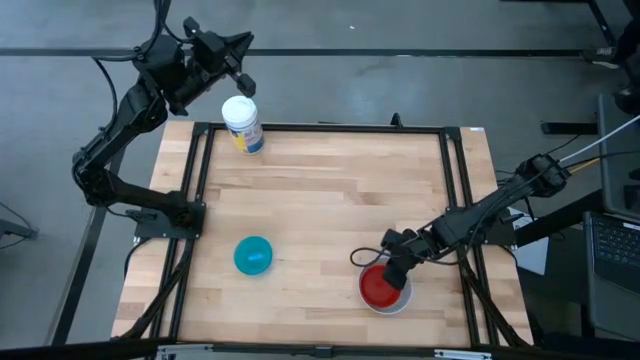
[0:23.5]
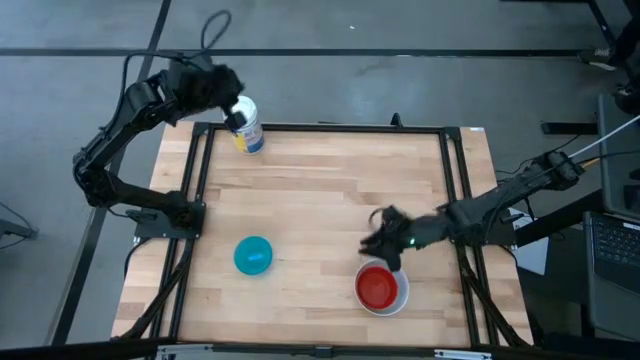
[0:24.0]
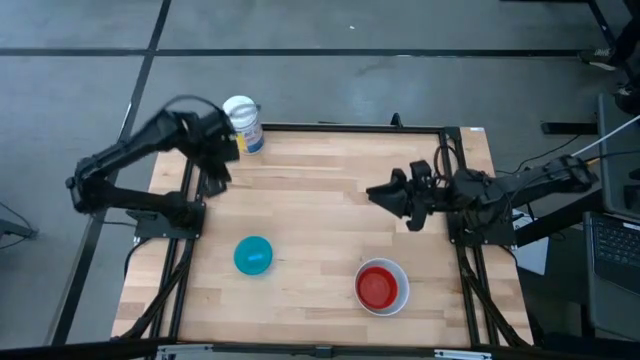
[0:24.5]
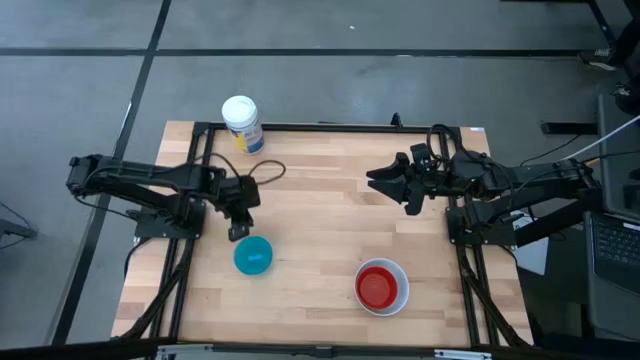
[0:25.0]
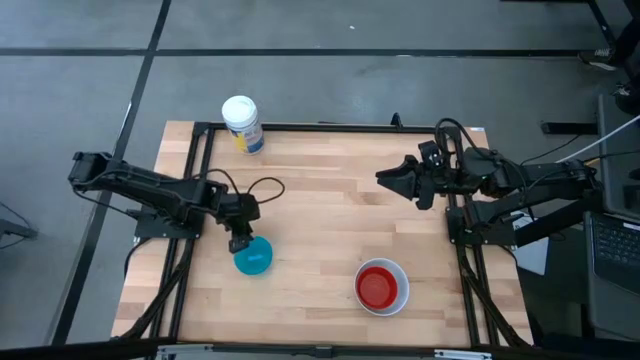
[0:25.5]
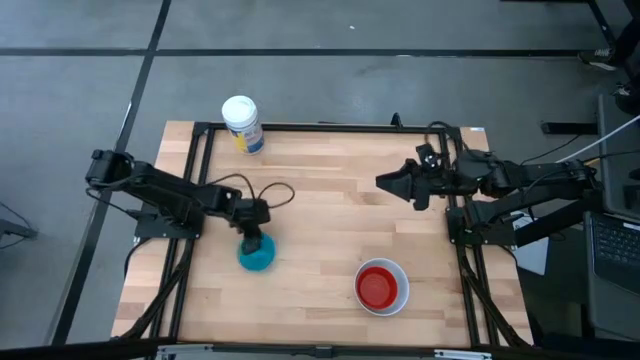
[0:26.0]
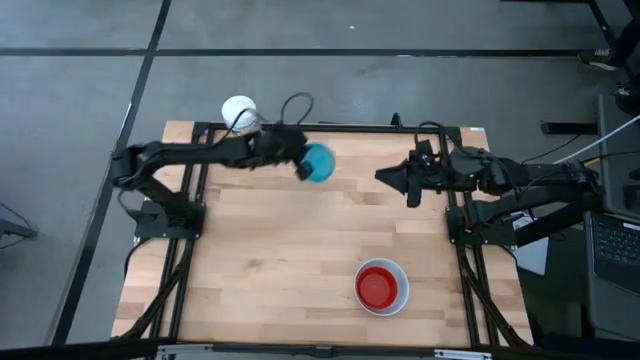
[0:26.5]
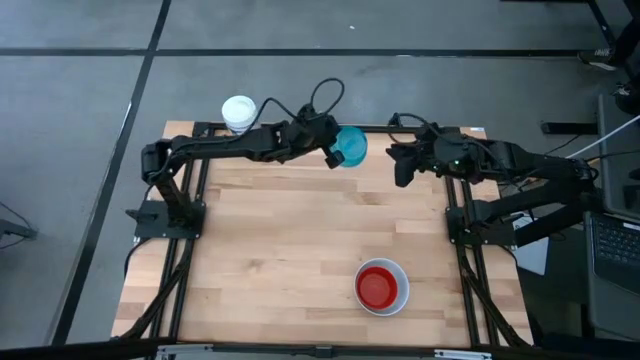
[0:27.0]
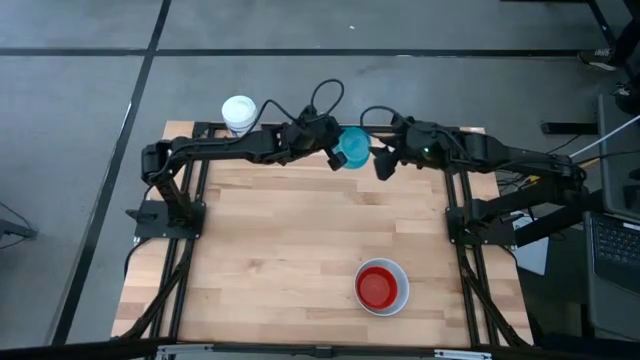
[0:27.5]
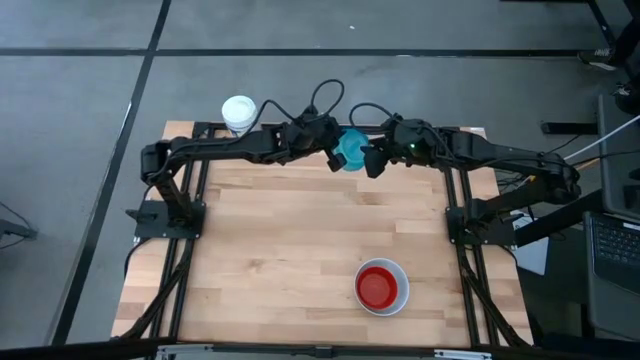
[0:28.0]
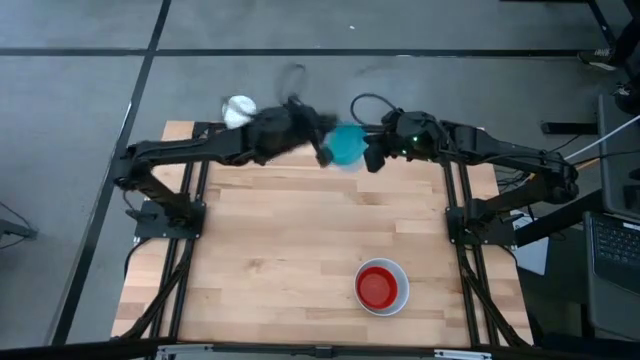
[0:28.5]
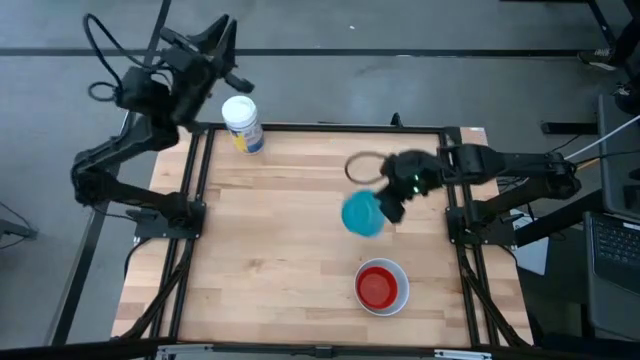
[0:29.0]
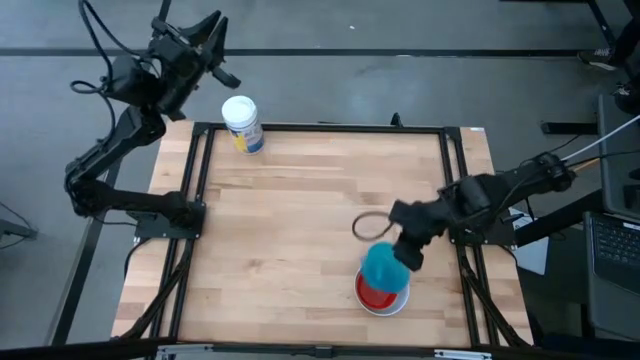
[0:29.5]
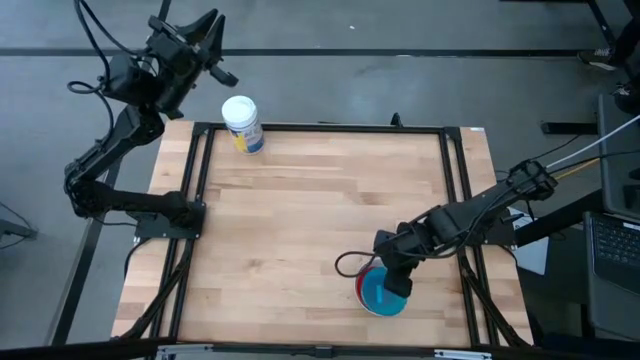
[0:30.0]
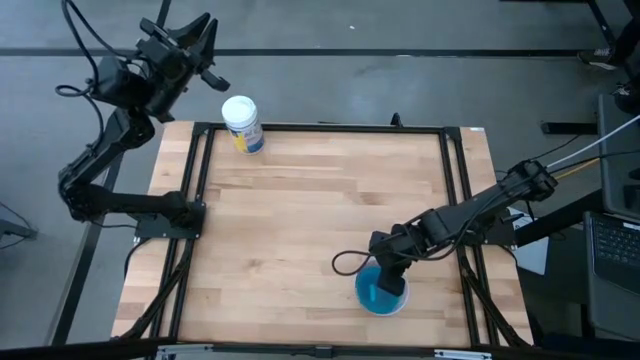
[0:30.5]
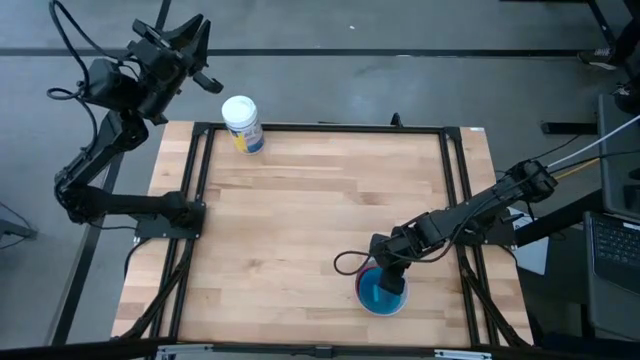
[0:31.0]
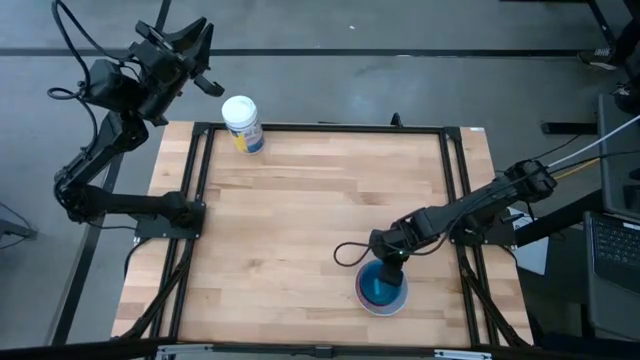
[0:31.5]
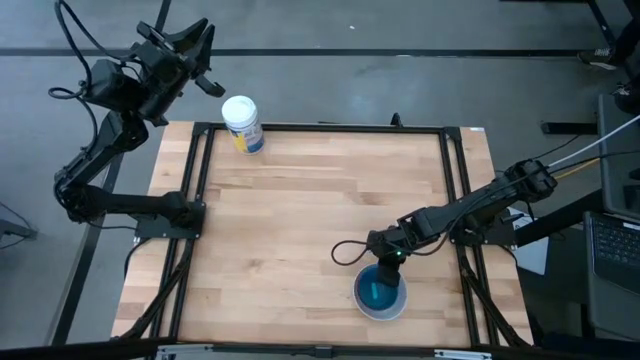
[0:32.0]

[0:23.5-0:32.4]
Stack the light blue bowl on top of the red bowl

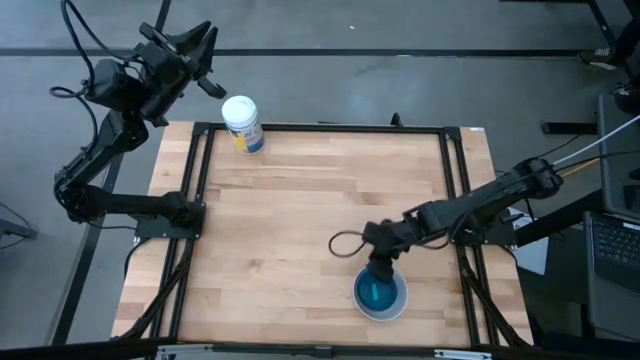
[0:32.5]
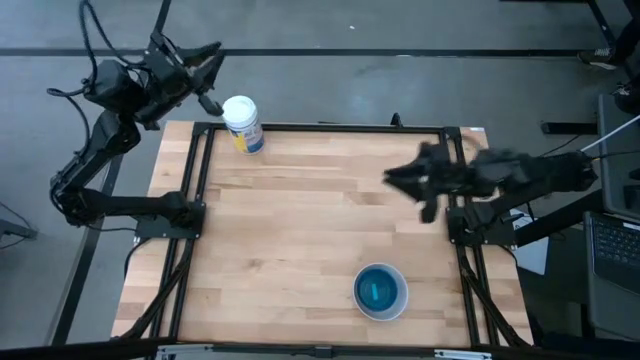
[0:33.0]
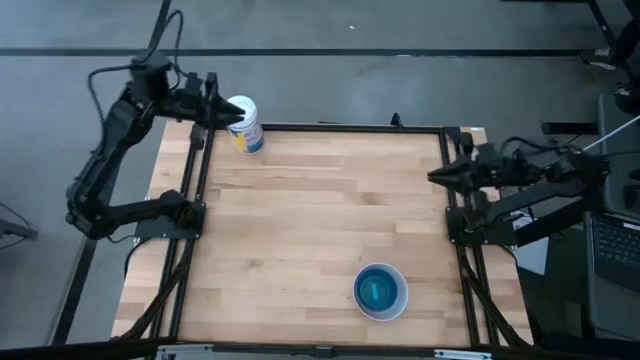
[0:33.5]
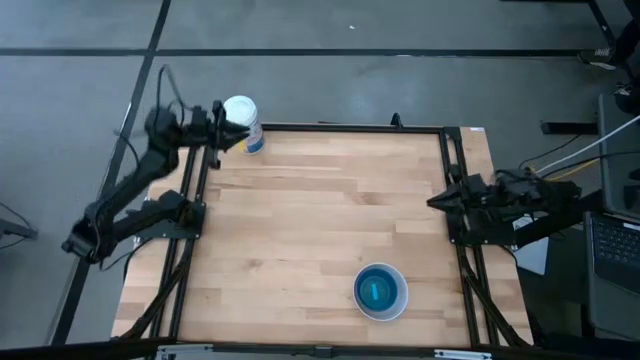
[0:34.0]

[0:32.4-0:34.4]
Return to Home Position

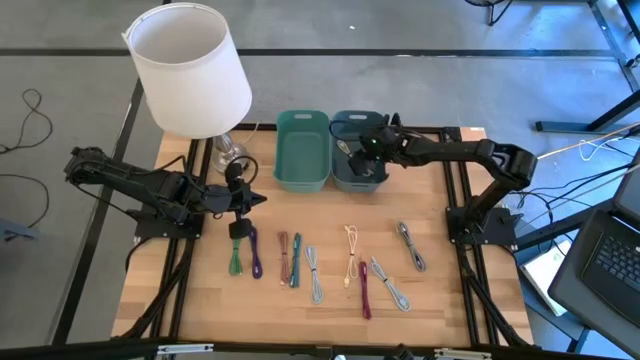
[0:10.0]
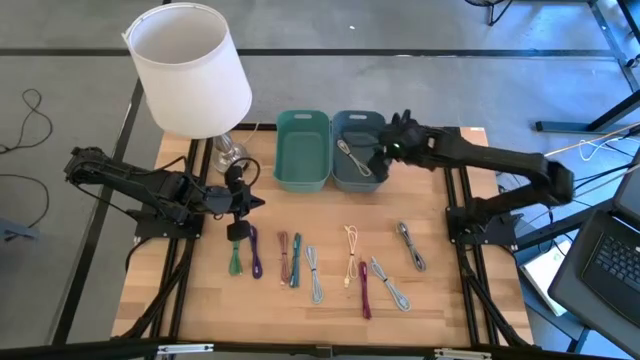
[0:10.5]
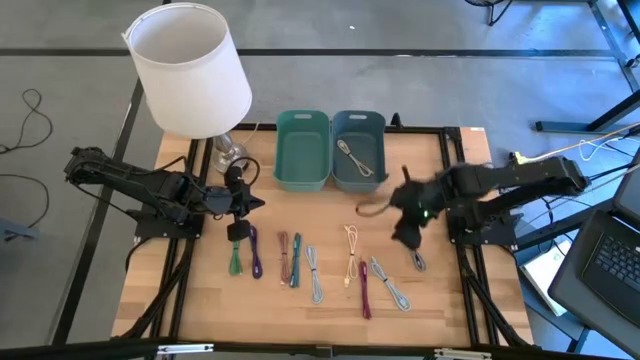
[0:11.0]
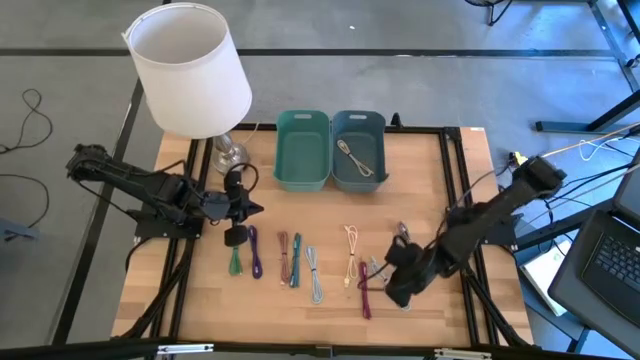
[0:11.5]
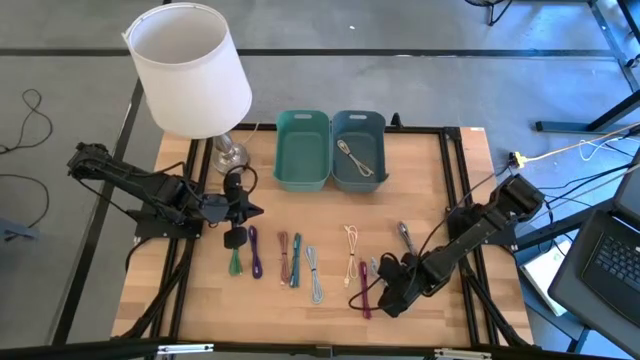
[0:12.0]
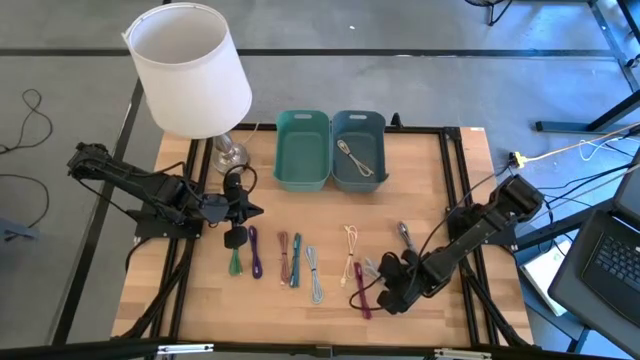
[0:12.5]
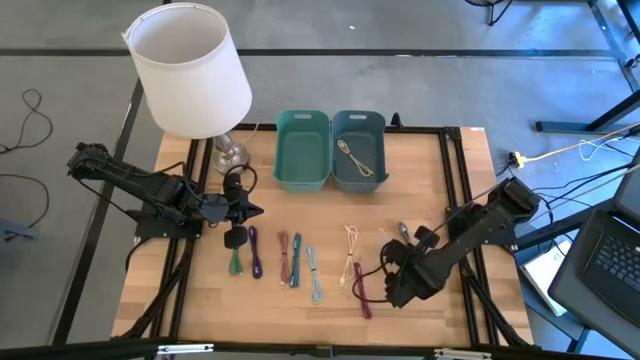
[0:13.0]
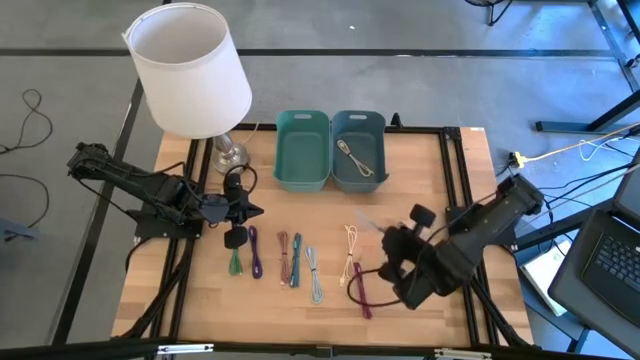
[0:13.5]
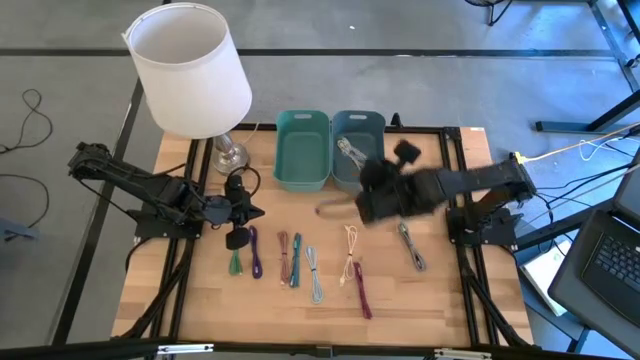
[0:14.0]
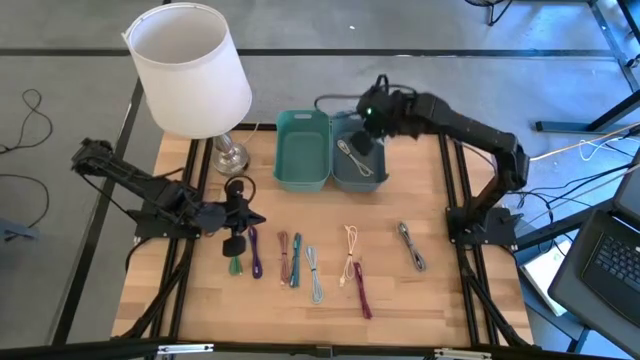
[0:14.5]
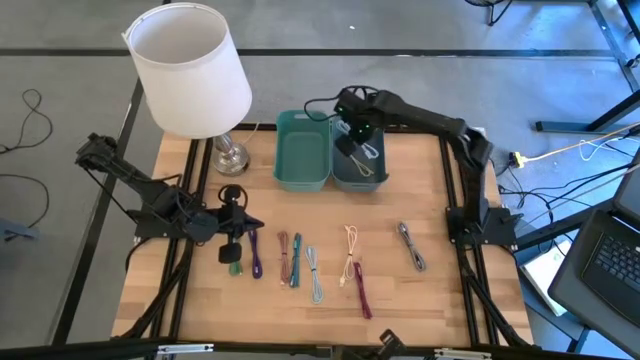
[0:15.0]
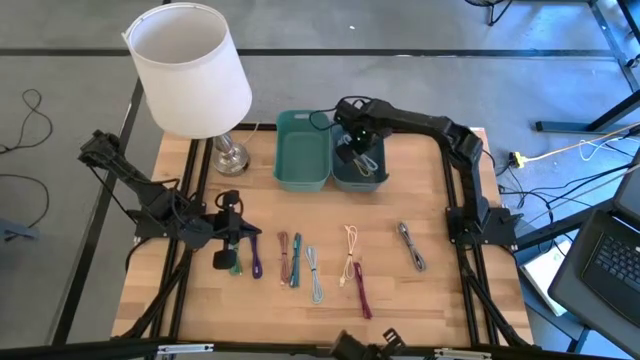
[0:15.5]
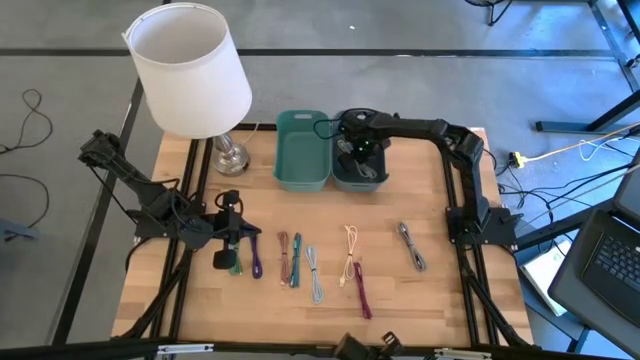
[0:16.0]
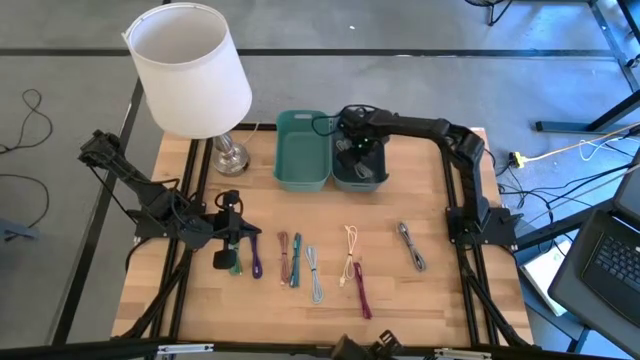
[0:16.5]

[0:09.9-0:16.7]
Put the blue charger cable into the blue bin
